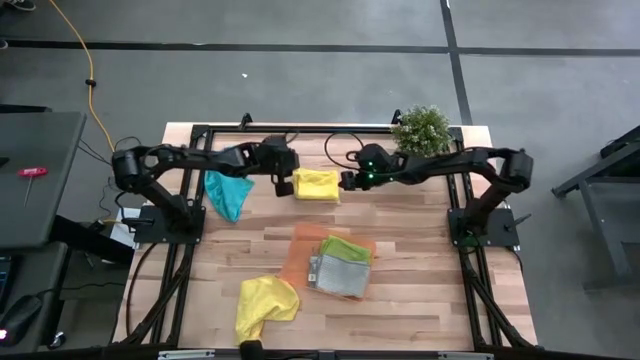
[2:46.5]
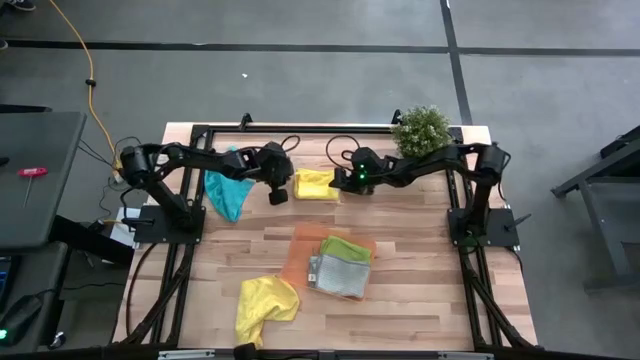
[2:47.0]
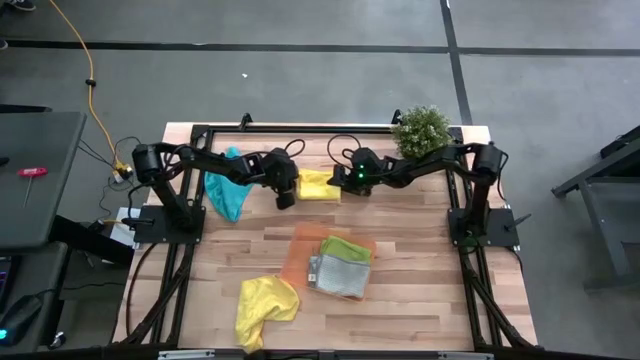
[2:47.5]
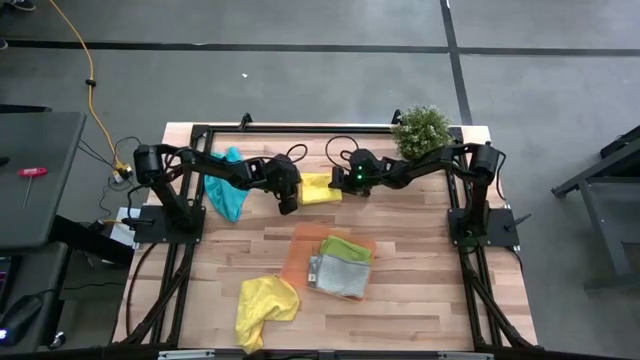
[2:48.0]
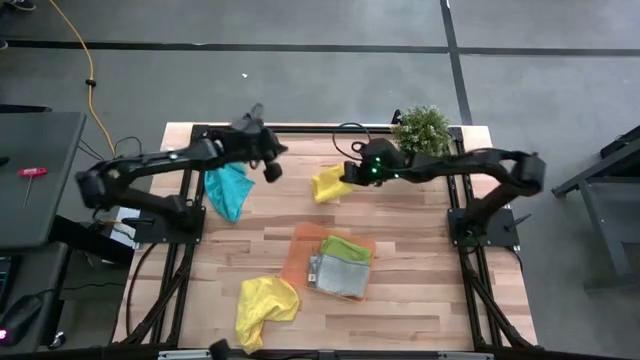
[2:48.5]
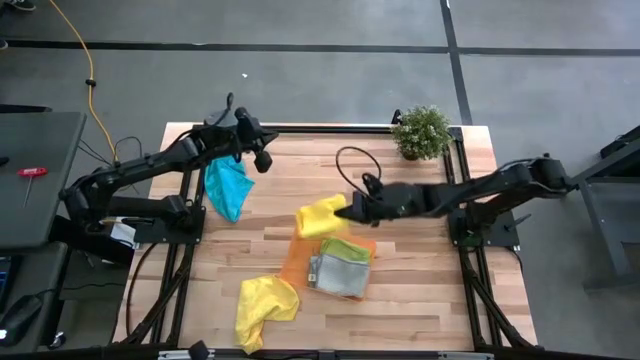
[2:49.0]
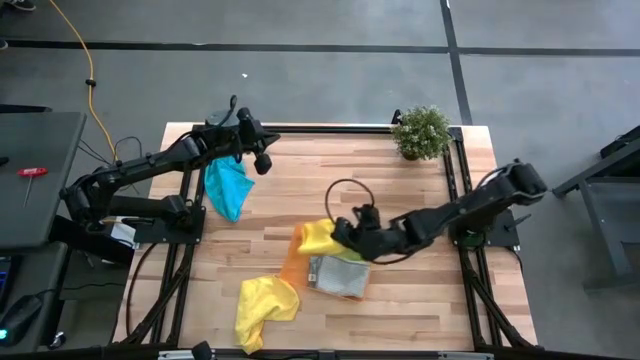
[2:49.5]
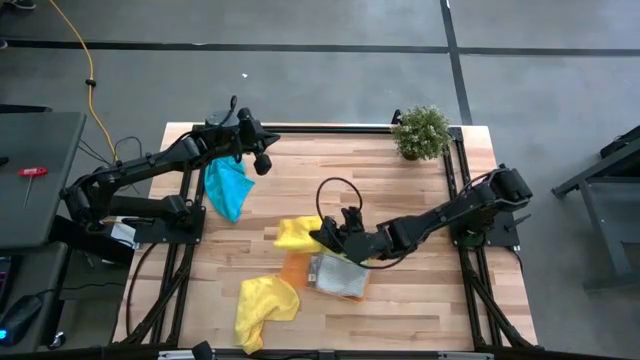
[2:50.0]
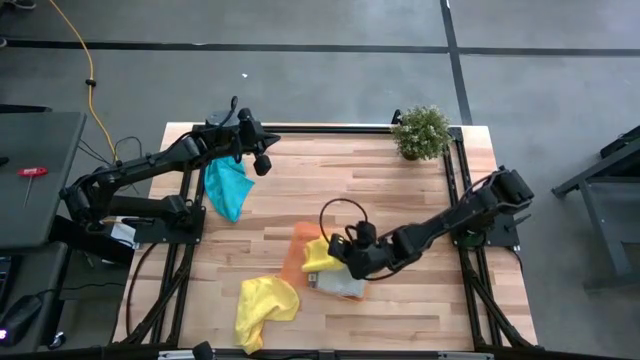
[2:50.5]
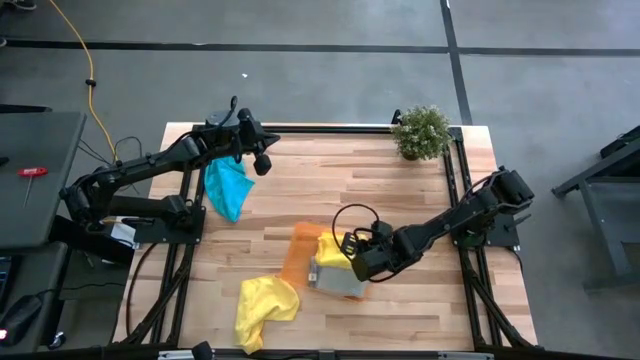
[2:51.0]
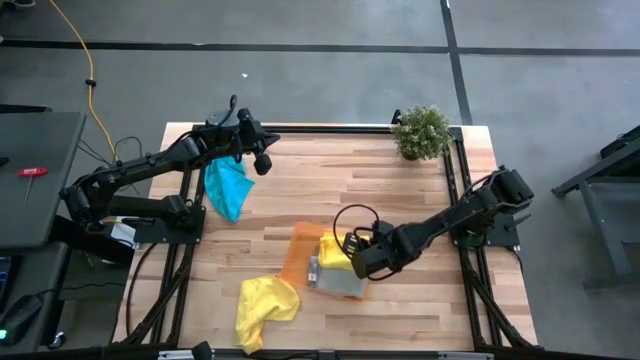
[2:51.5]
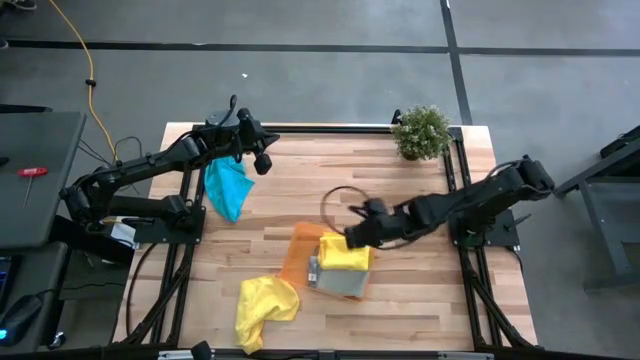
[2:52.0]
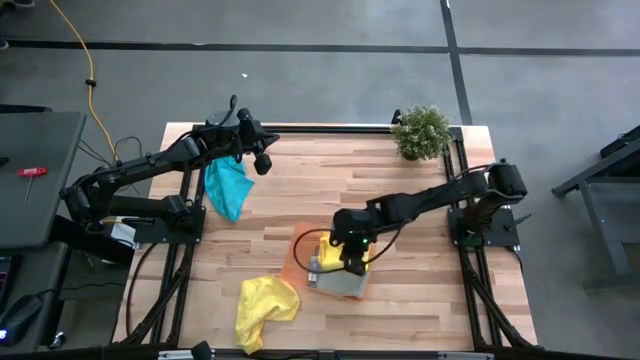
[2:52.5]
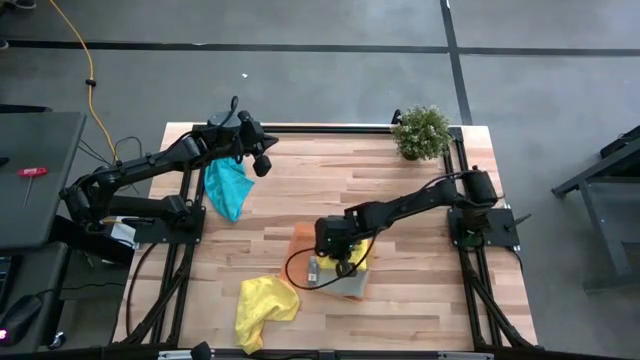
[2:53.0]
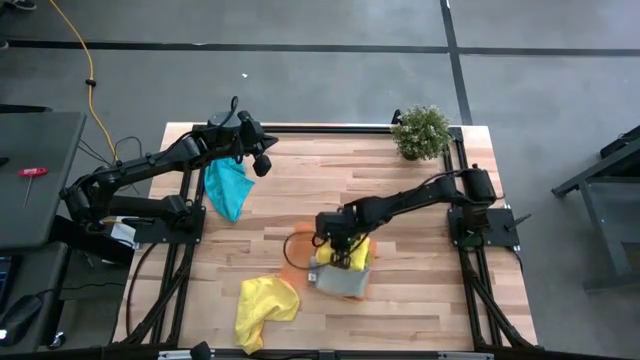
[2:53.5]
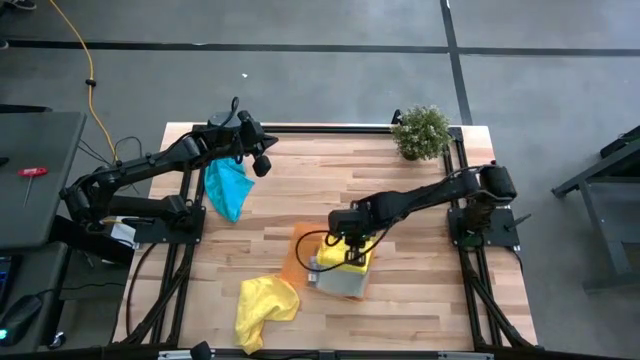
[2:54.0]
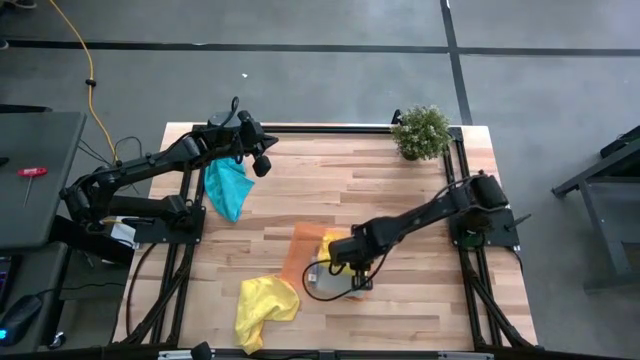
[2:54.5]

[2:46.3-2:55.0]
Task: Fold microfiber towels
Put the folded yellow towel into the bin

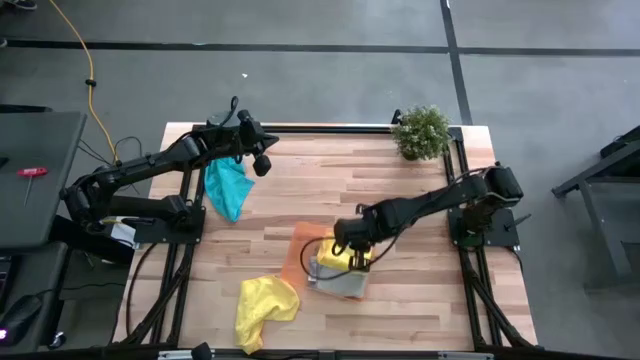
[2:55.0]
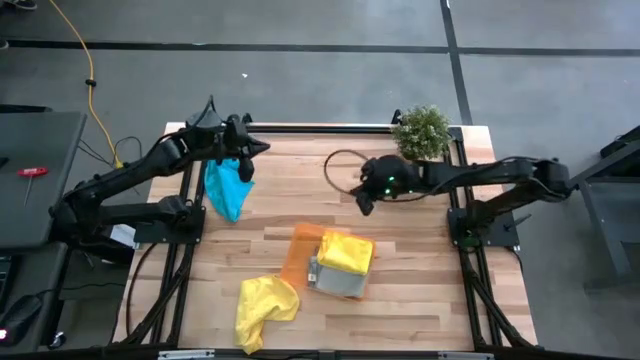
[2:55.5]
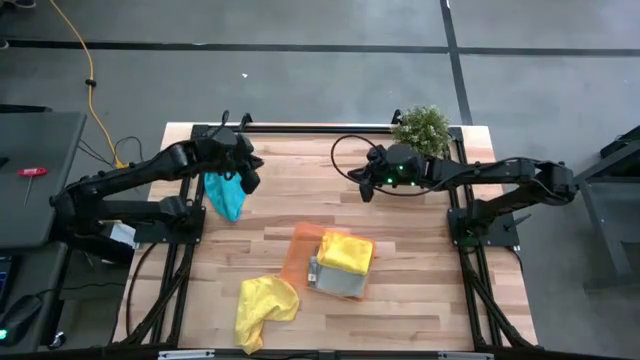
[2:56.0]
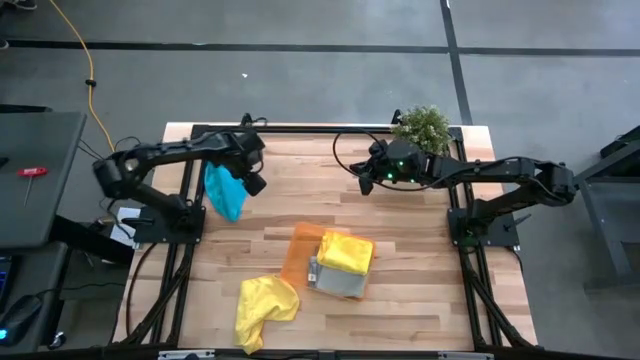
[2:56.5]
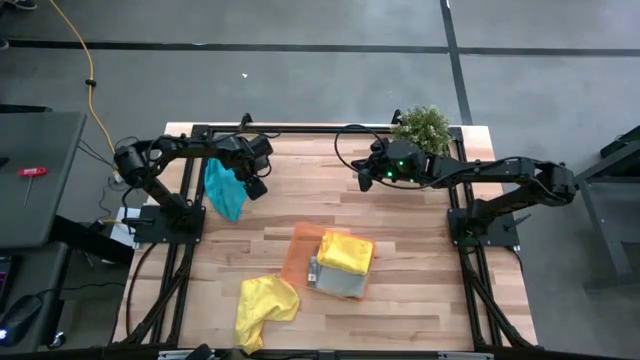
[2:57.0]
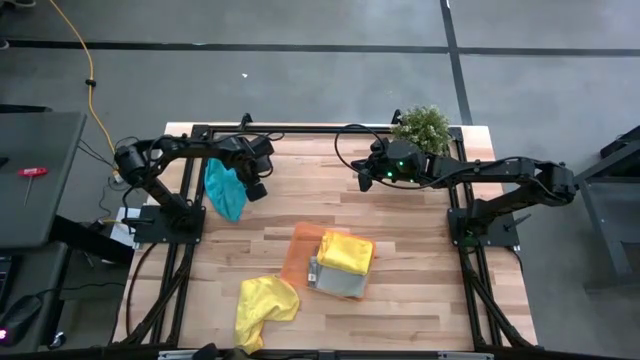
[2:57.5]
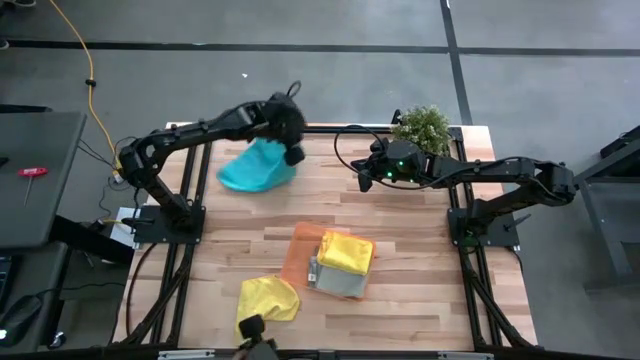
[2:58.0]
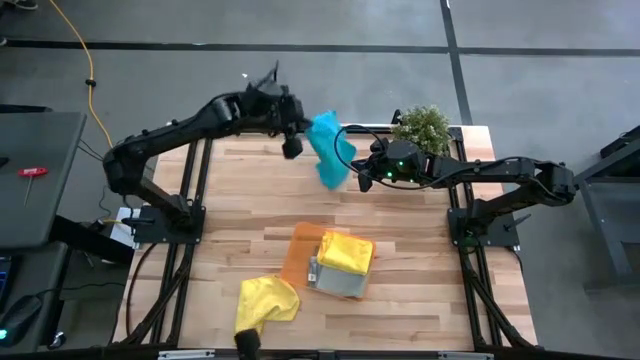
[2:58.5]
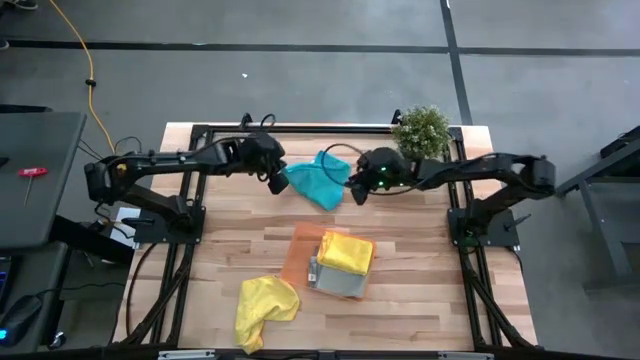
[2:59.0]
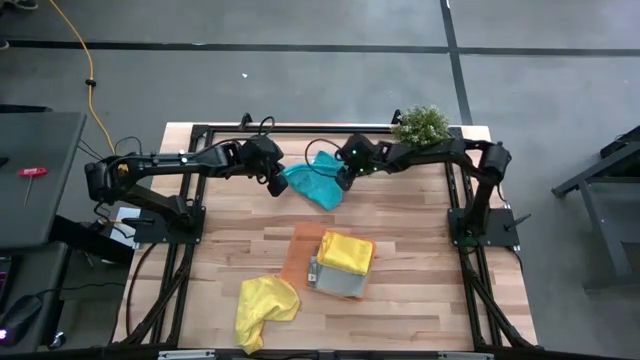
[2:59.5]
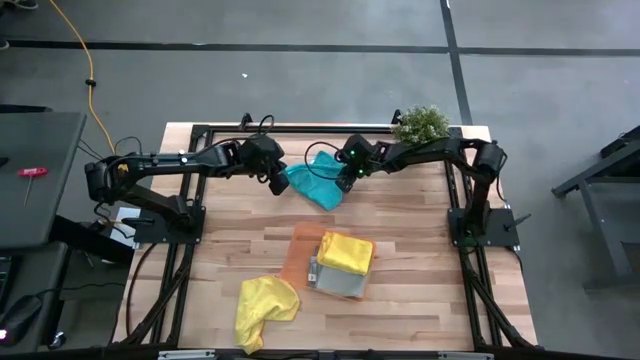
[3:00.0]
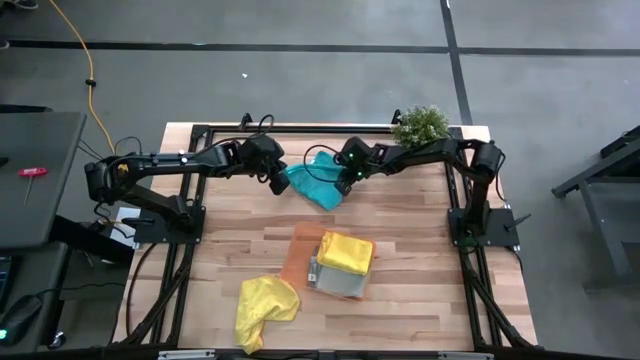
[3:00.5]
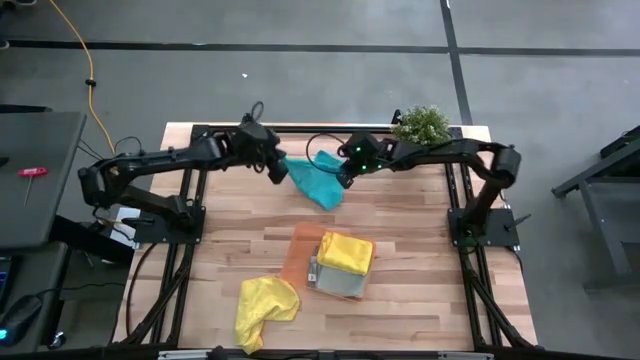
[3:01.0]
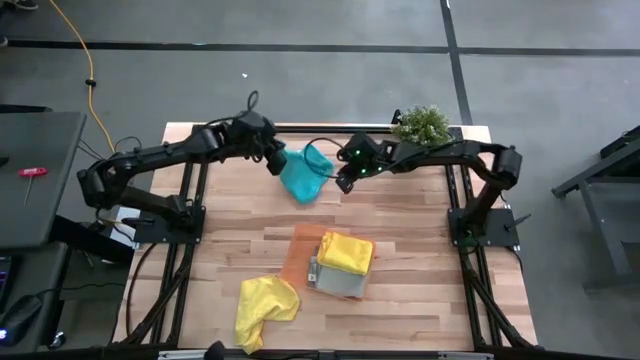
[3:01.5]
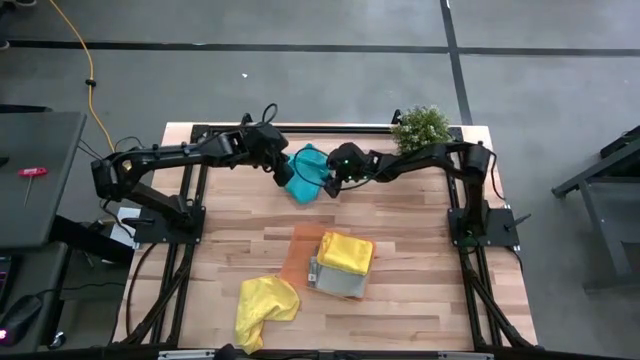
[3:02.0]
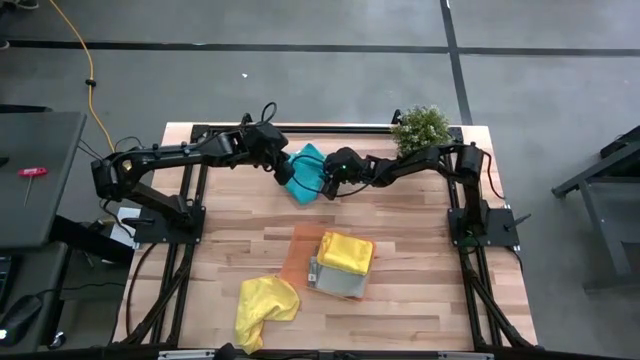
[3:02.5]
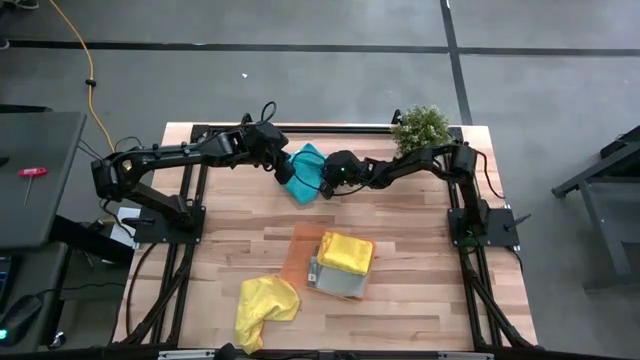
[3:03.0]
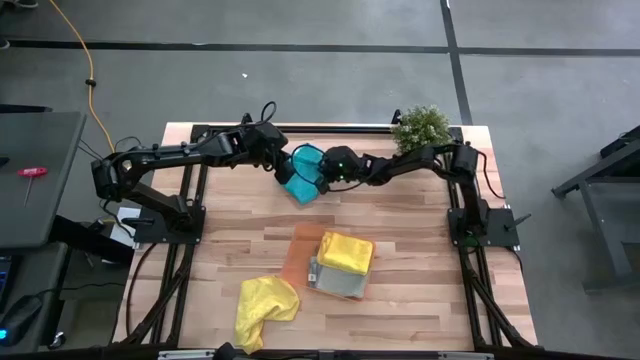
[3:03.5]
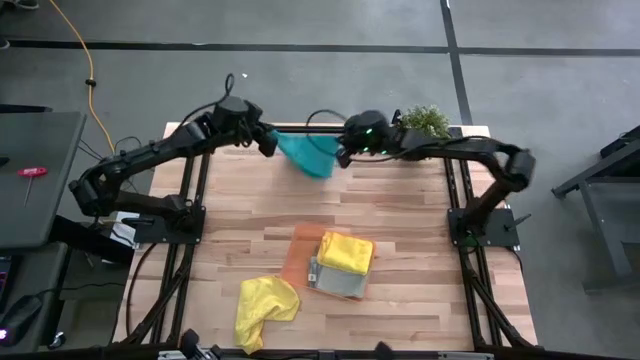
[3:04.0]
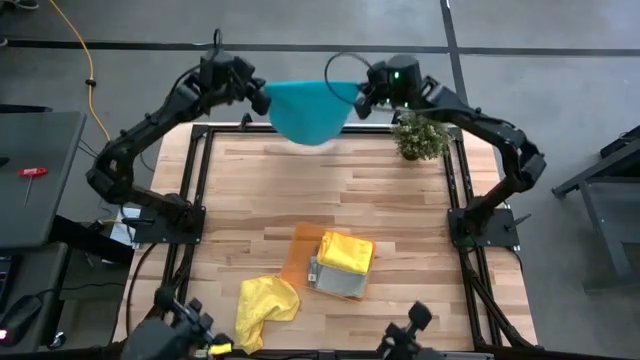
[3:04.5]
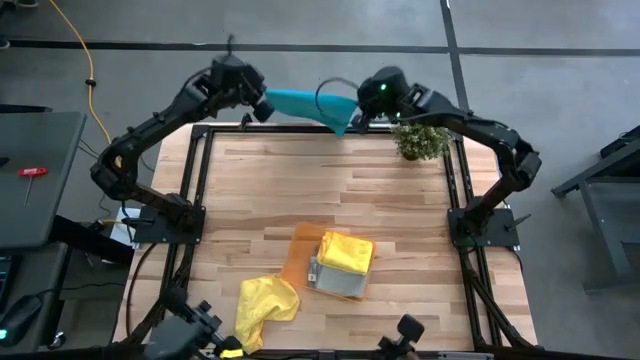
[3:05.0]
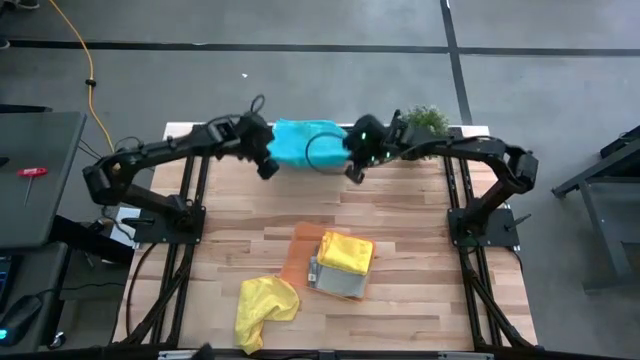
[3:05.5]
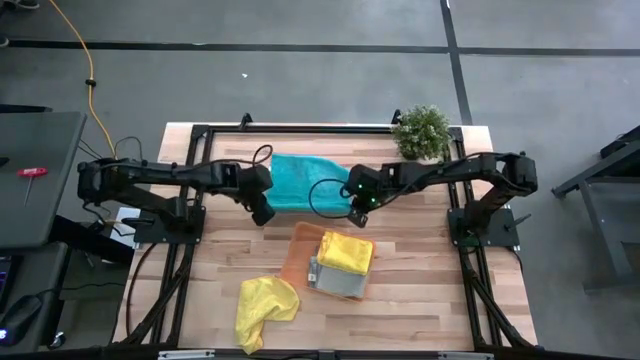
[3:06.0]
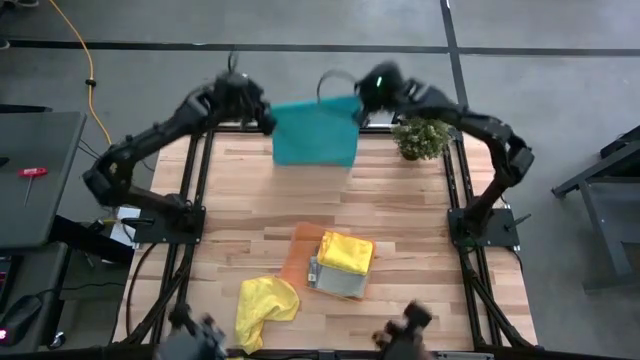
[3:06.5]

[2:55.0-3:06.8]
Fold the blue towel
